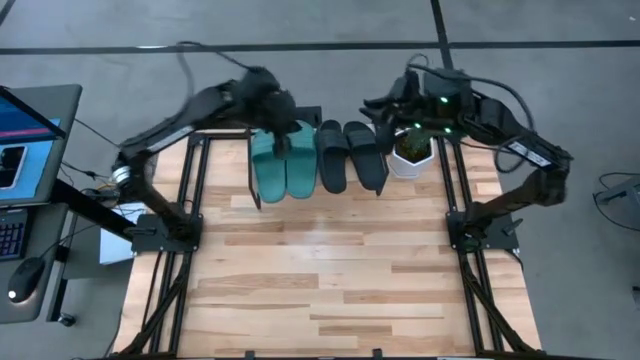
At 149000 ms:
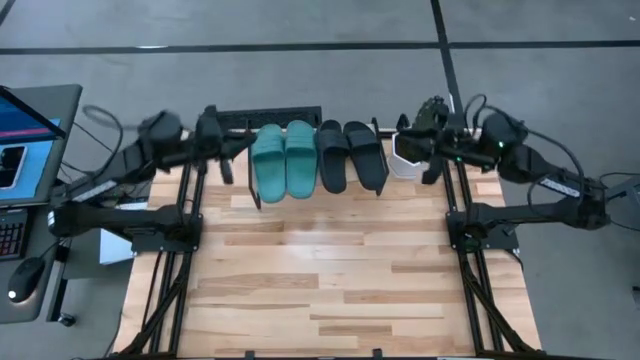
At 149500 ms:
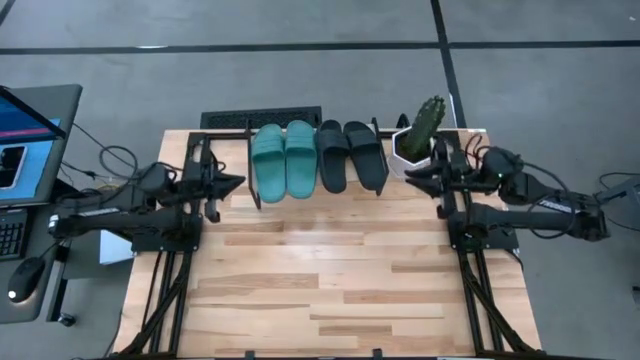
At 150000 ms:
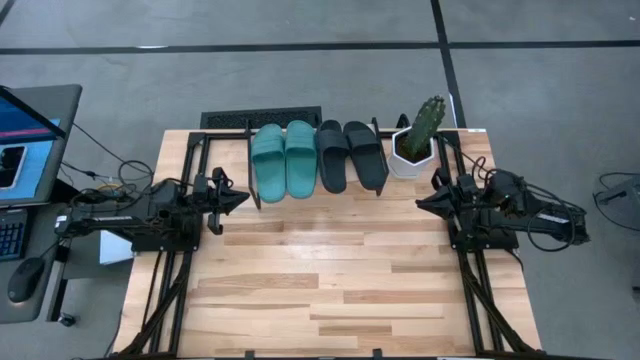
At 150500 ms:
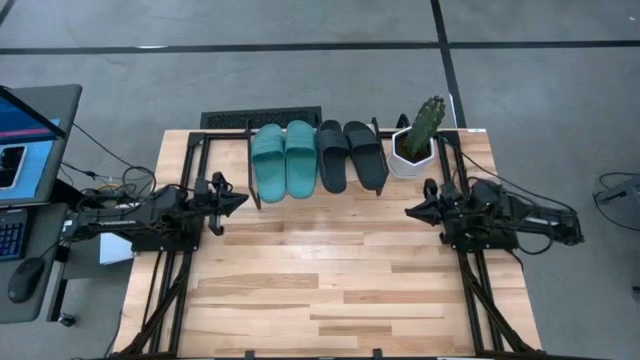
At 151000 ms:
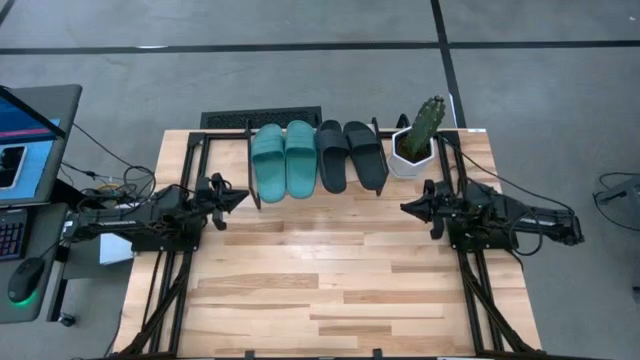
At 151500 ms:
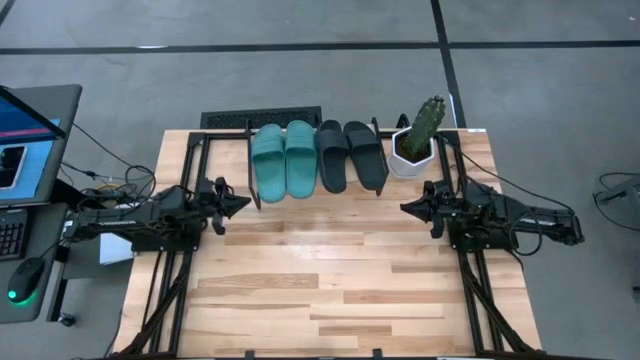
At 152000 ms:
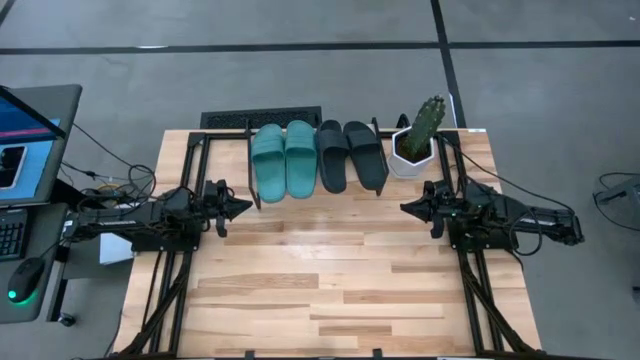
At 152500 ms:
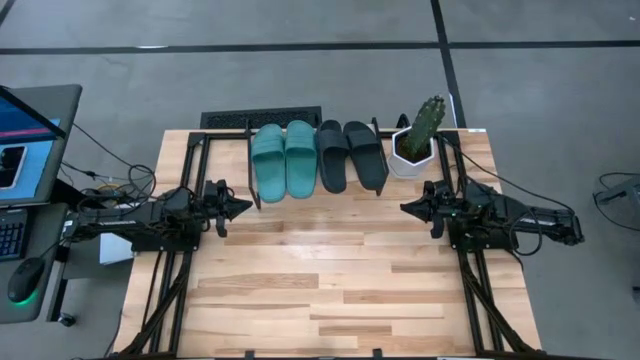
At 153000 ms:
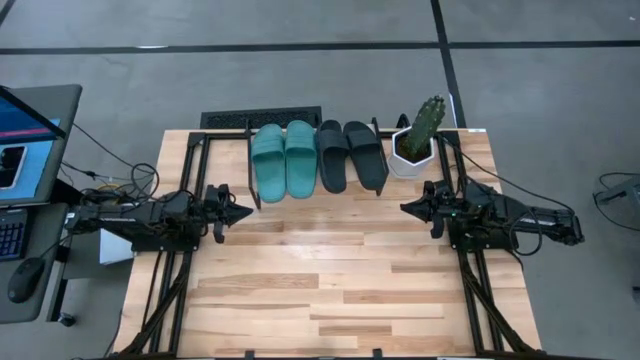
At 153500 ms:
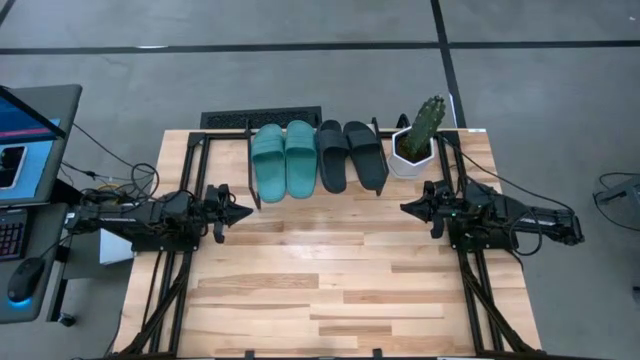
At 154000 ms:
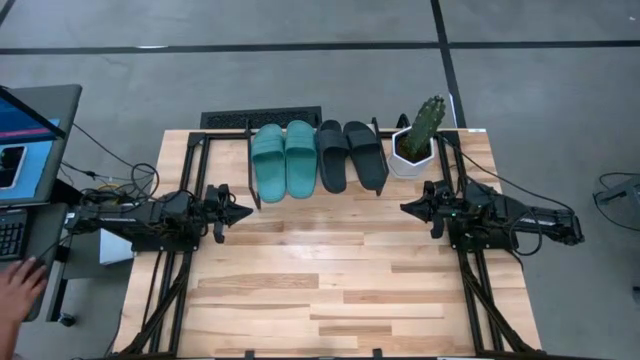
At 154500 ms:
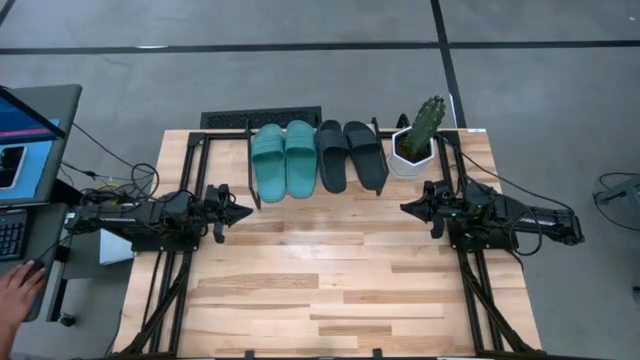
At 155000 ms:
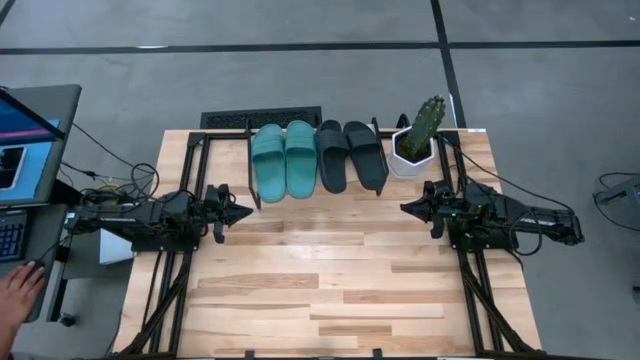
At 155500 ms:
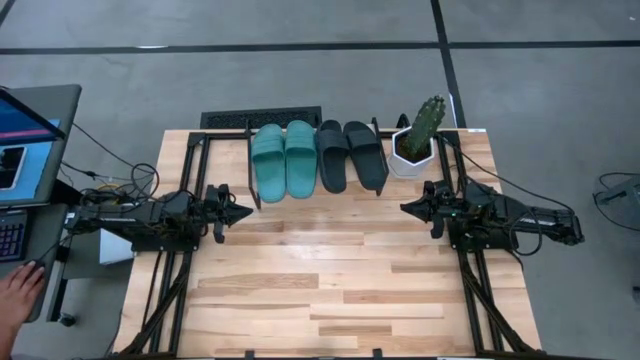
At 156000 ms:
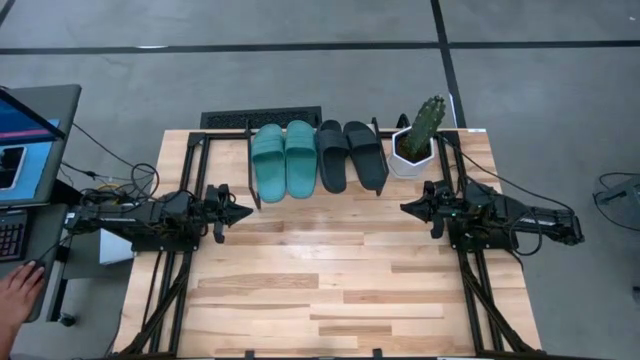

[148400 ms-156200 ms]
Task: Pick and place slides into the shelf
Return to Home Position

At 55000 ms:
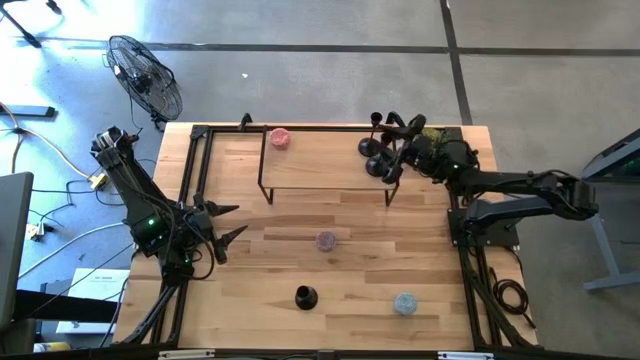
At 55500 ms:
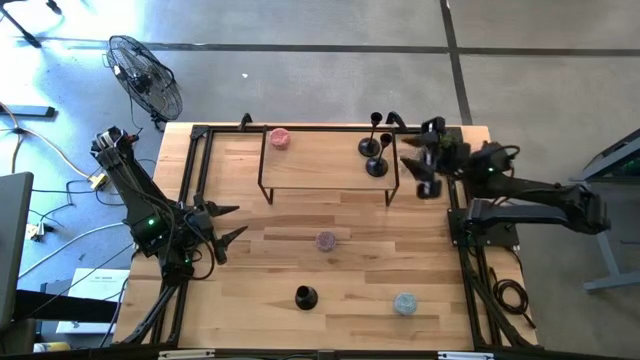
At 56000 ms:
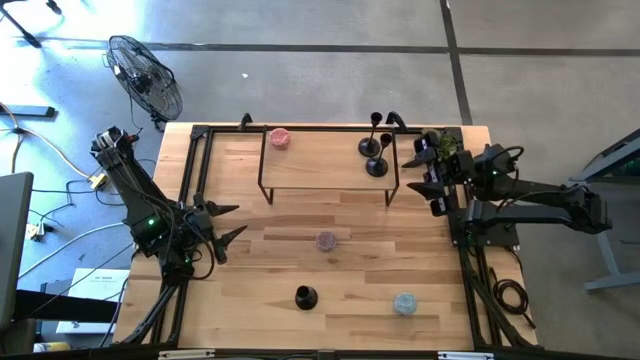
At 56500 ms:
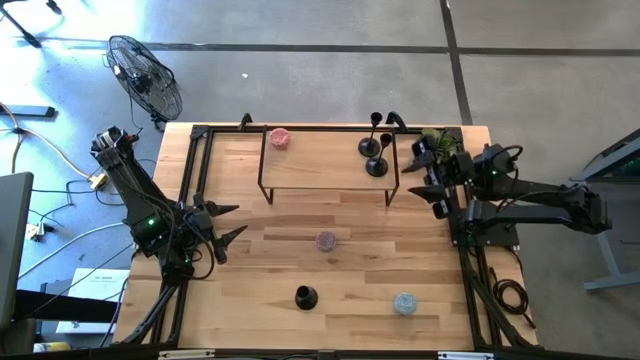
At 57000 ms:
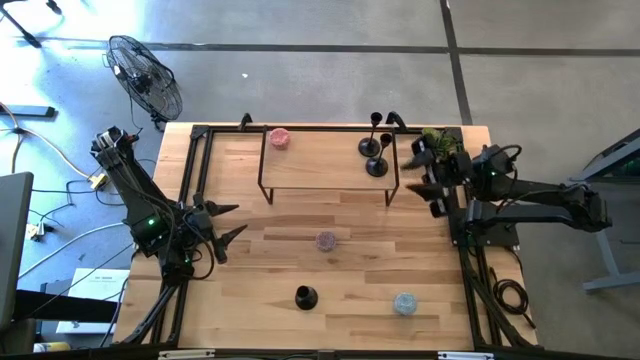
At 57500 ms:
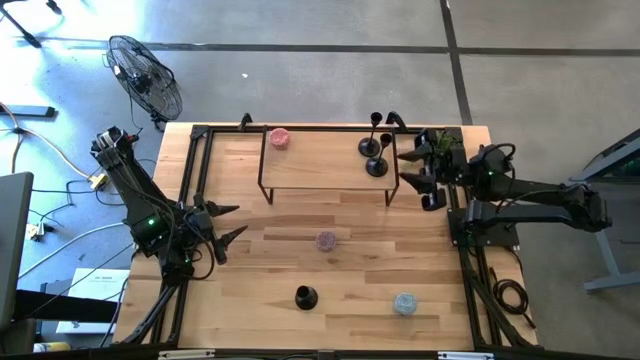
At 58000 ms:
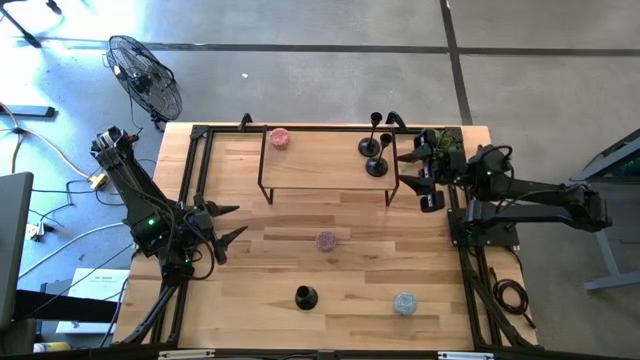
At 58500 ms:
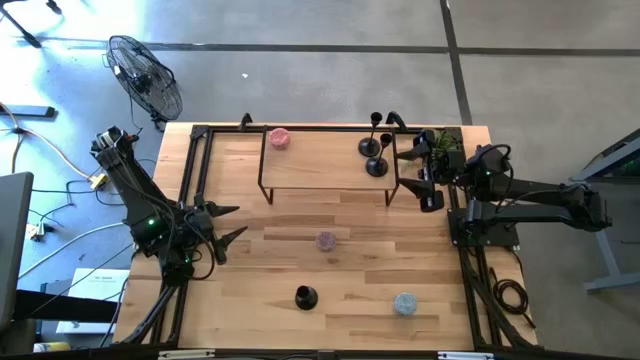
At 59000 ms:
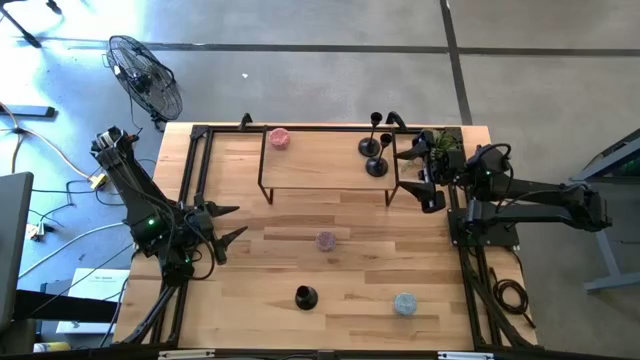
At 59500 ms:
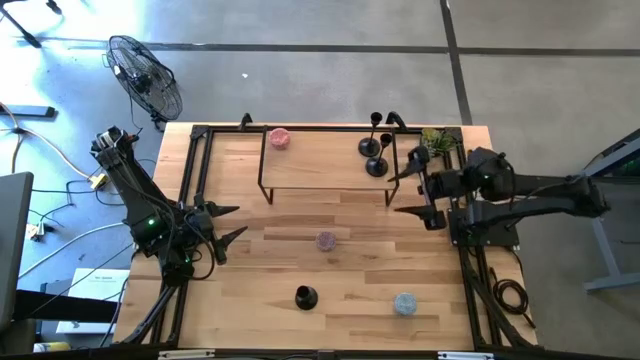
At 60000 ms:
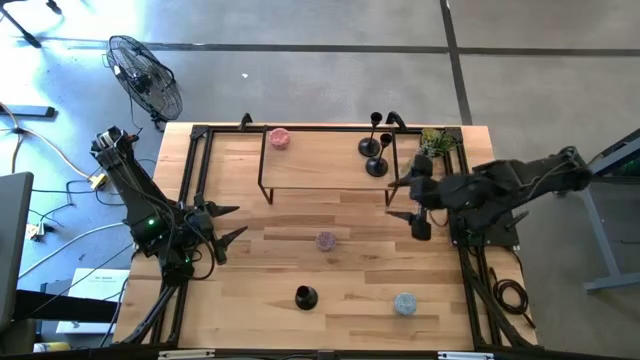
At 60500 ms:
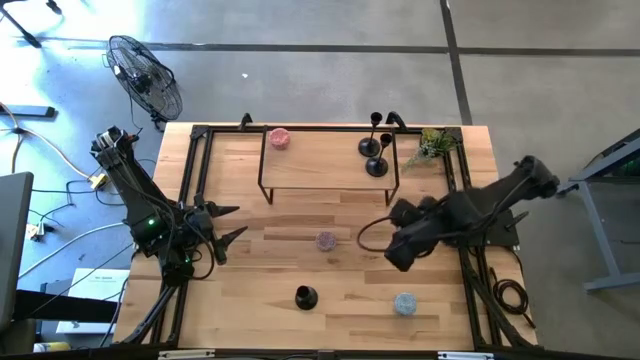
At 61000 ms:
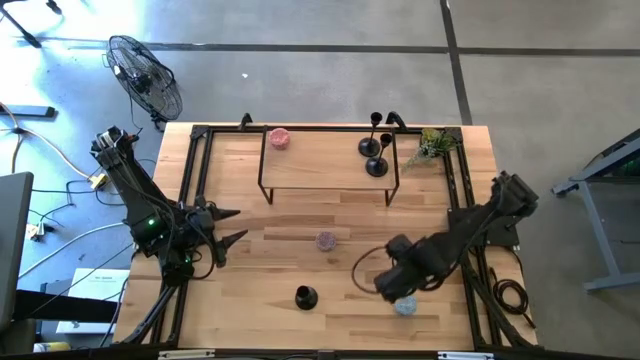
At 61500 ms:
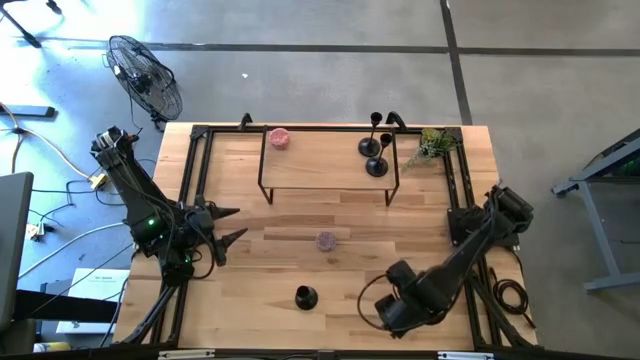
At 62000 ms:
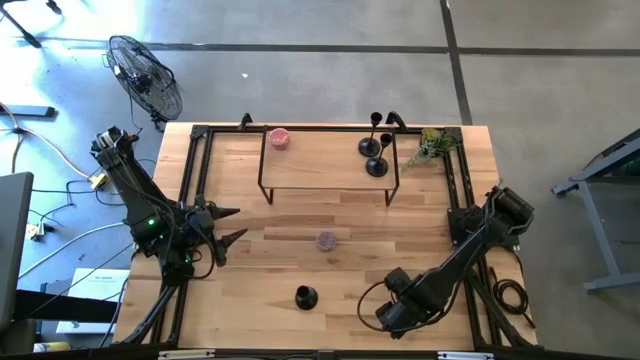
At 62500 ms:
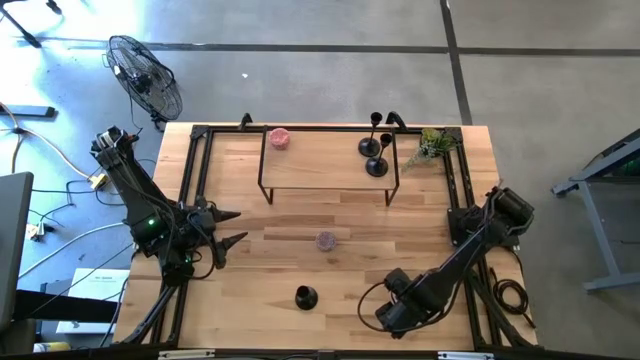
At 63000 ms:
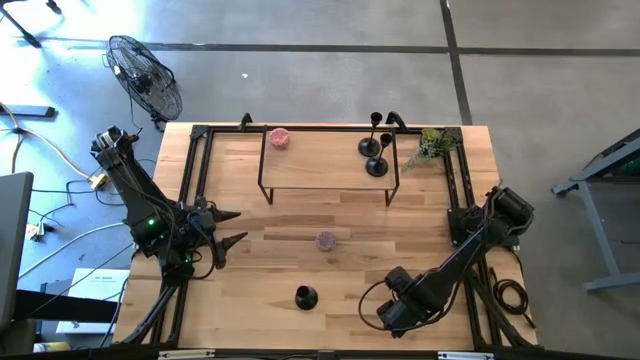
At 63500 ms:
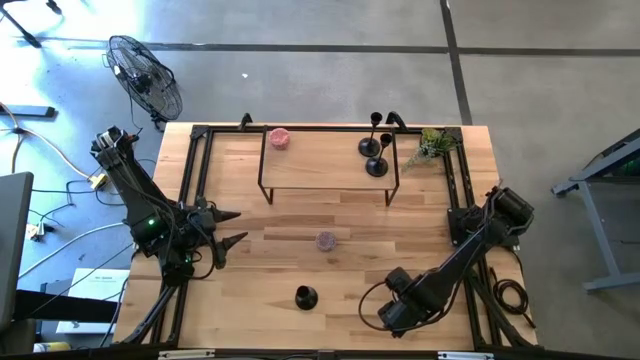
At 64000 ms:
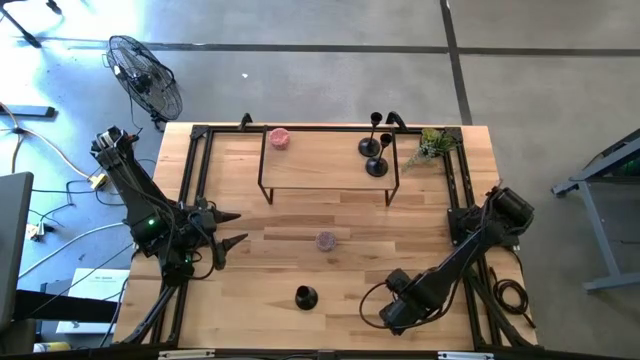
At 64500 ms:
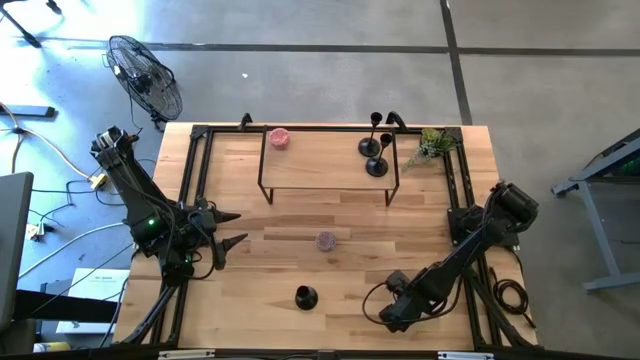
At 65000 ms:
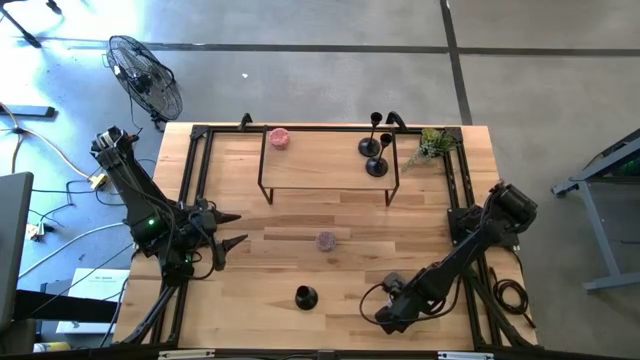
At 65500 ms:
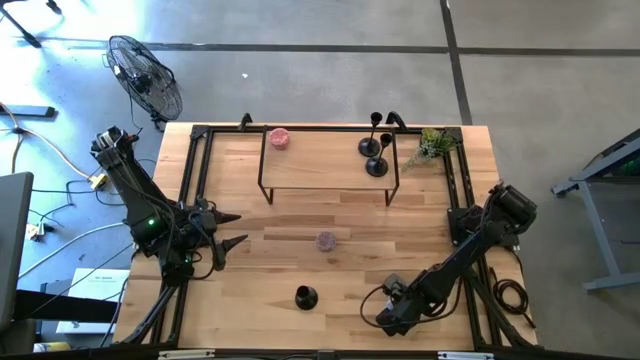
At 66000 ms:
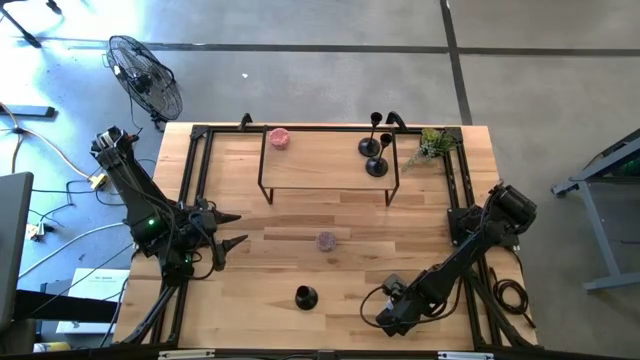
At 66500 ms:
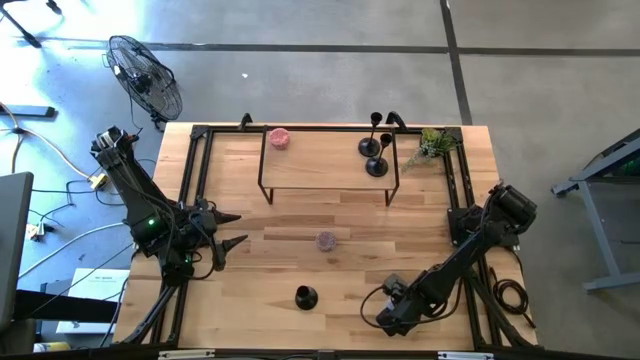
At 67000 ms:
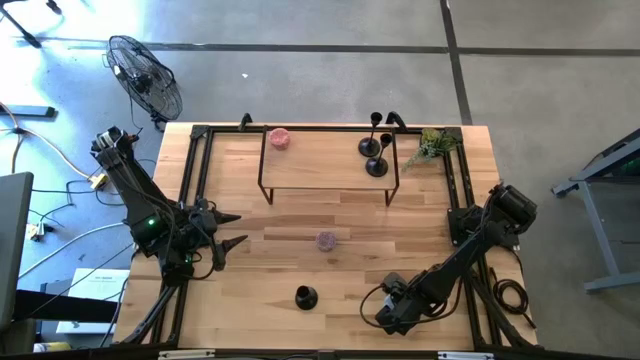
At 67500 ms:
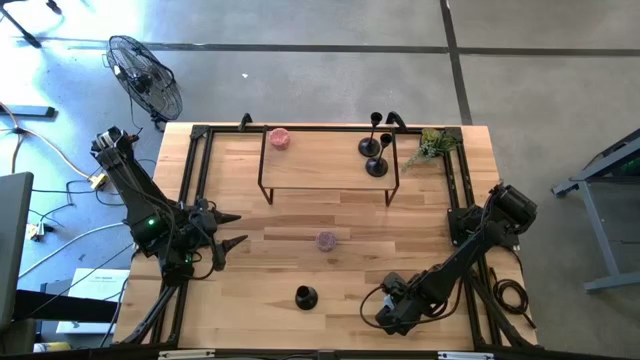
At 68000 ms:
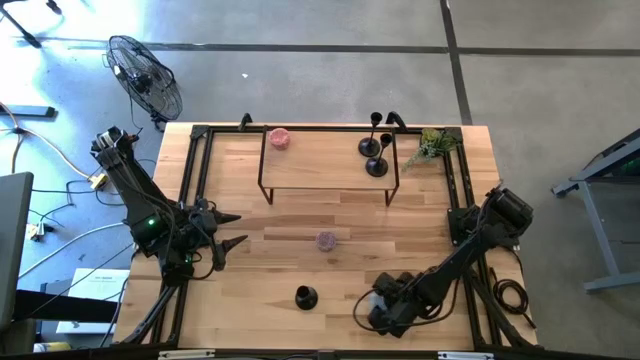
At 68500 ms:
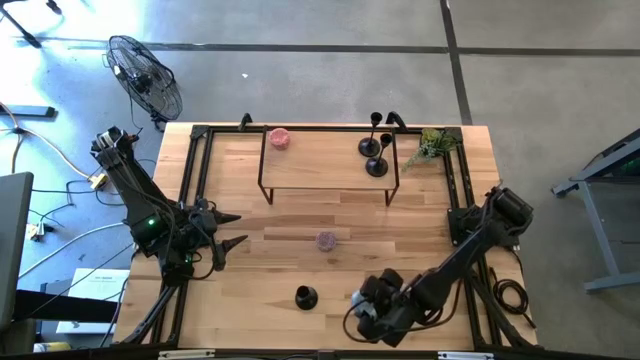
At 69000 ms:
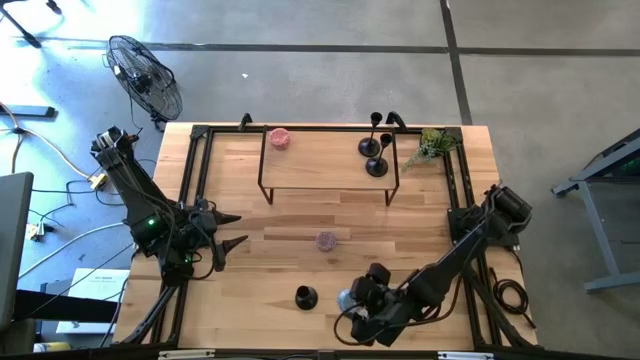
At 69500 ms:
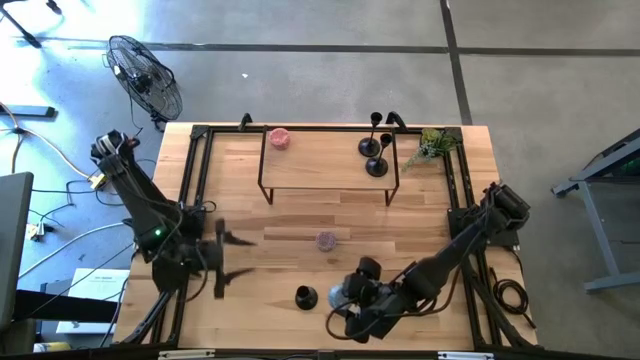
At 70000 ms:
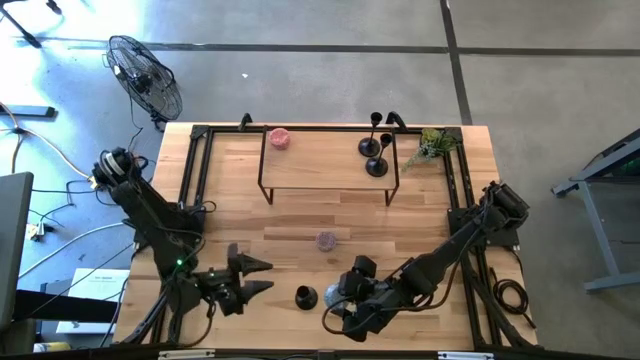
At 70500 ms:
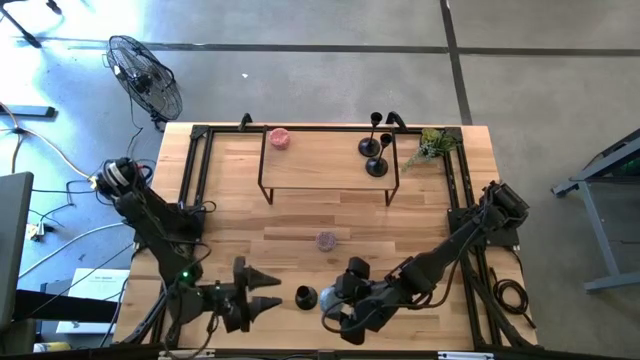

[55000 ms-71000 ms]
Task: Pick & Place candle stick holders
Put the blue patterned scented candle on the shelf
